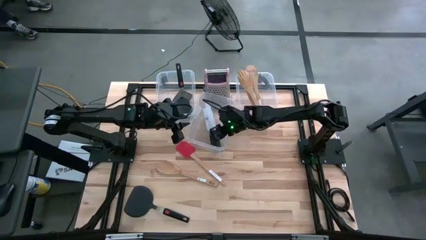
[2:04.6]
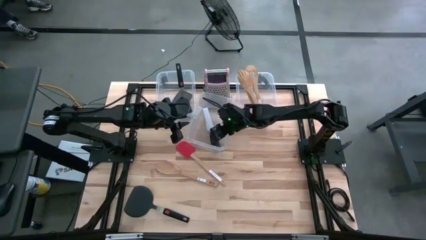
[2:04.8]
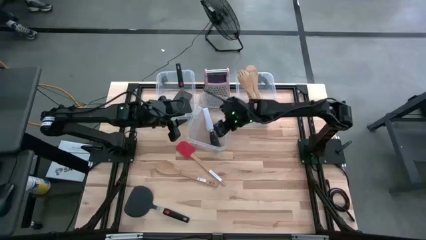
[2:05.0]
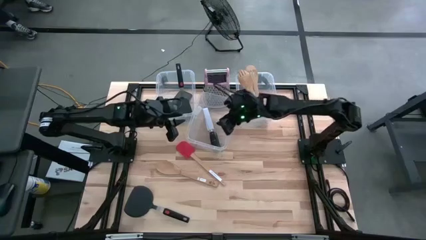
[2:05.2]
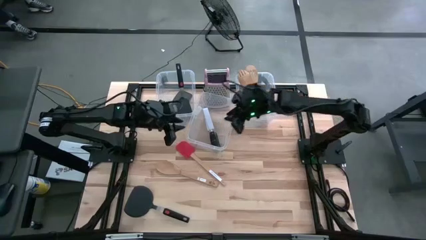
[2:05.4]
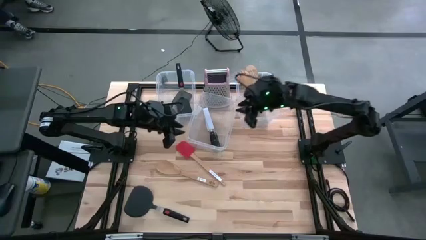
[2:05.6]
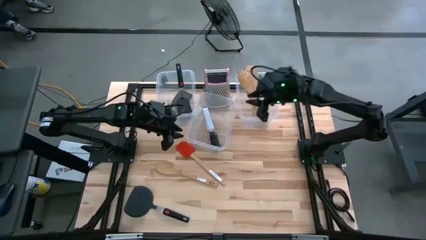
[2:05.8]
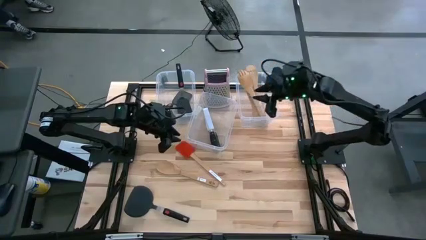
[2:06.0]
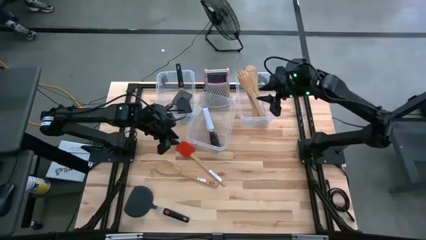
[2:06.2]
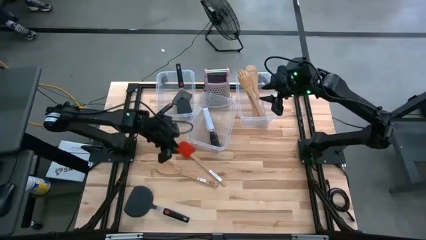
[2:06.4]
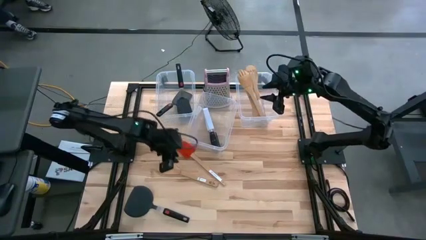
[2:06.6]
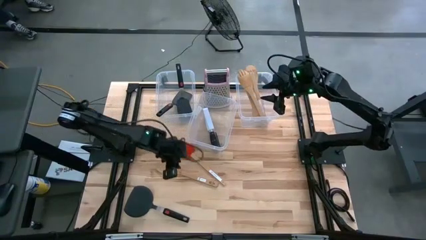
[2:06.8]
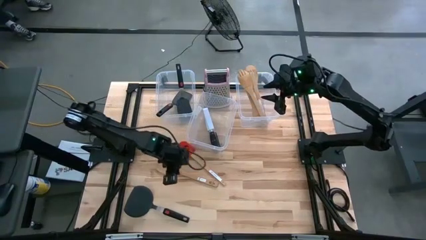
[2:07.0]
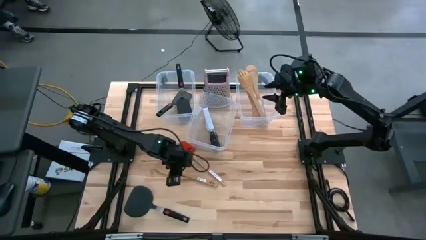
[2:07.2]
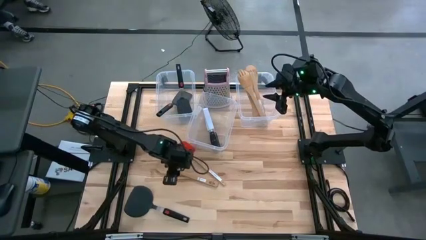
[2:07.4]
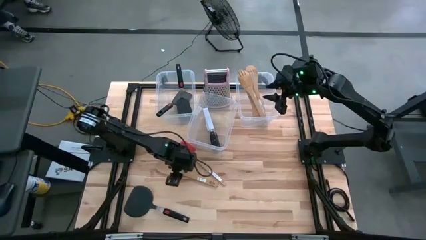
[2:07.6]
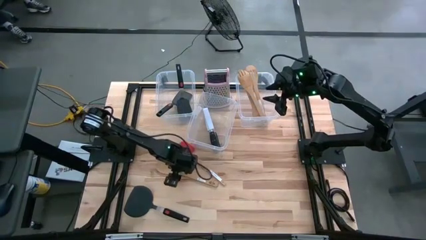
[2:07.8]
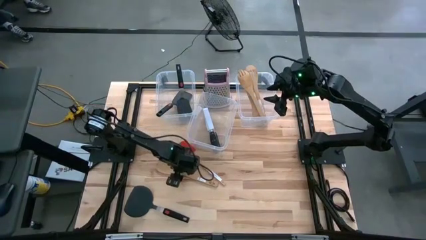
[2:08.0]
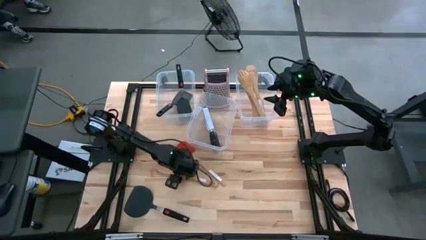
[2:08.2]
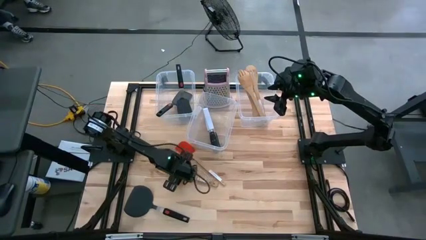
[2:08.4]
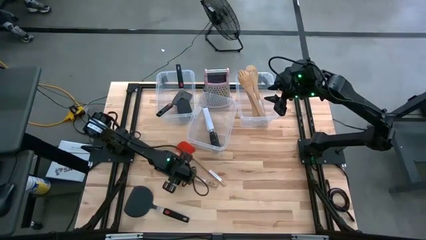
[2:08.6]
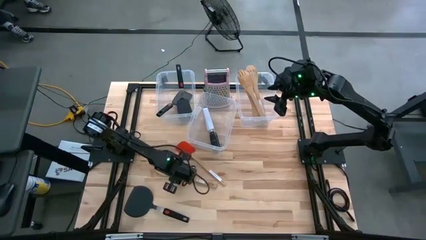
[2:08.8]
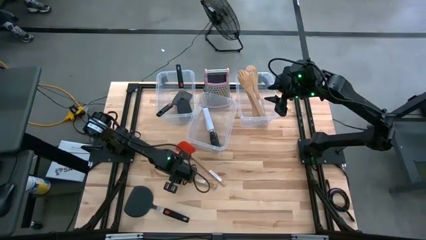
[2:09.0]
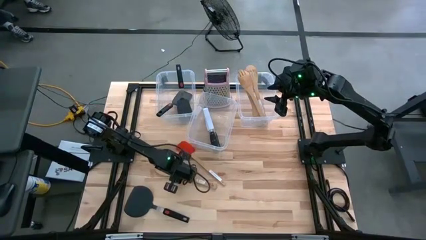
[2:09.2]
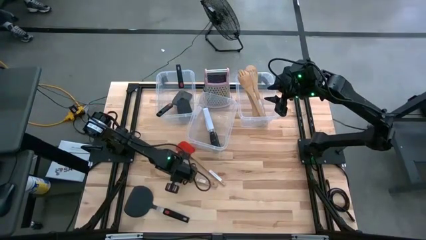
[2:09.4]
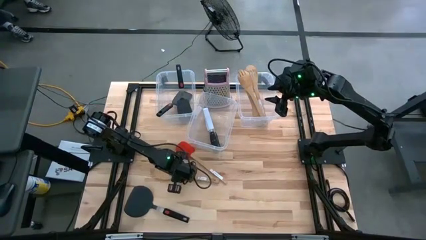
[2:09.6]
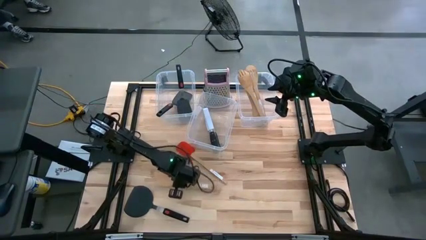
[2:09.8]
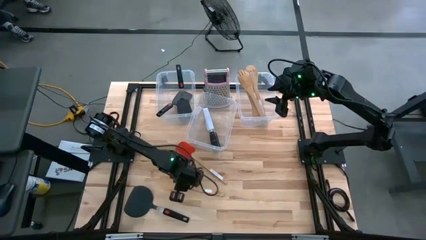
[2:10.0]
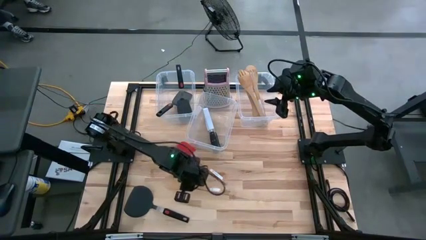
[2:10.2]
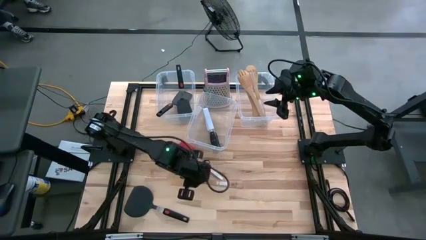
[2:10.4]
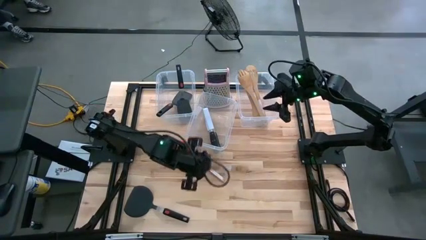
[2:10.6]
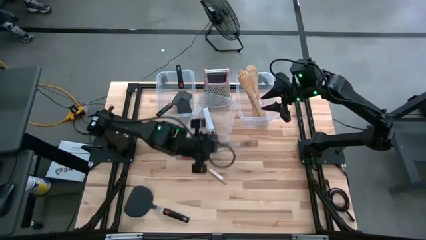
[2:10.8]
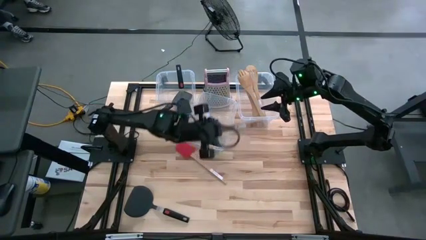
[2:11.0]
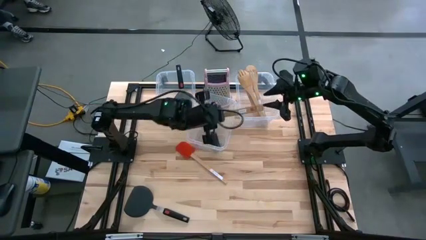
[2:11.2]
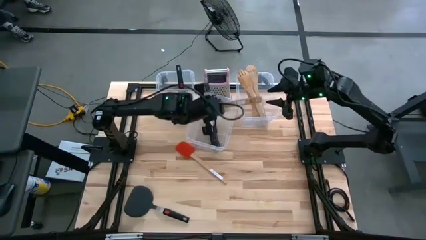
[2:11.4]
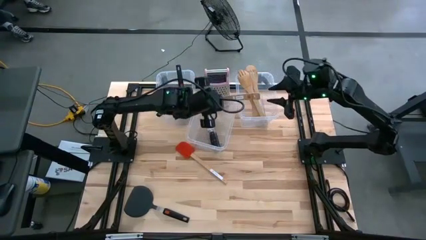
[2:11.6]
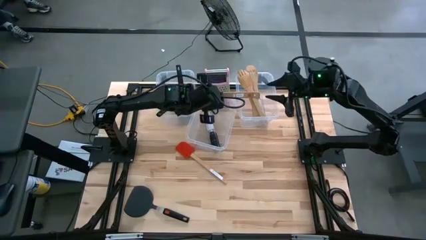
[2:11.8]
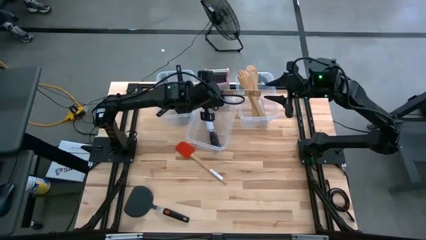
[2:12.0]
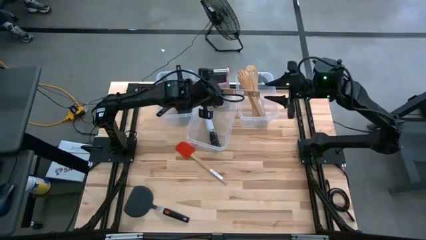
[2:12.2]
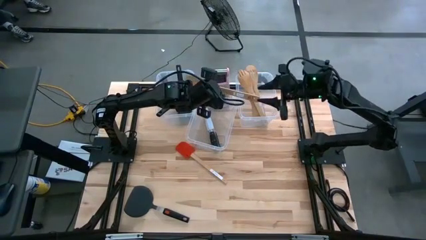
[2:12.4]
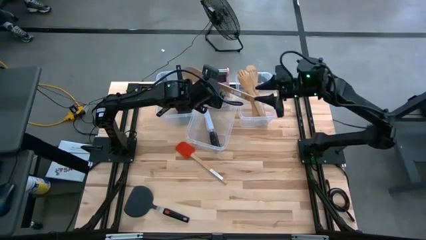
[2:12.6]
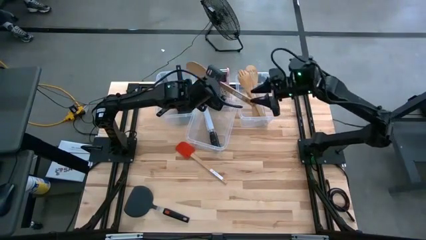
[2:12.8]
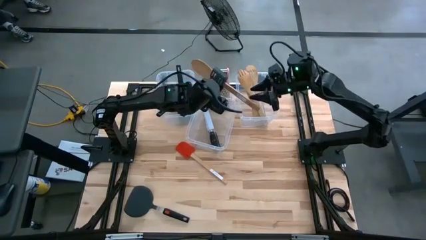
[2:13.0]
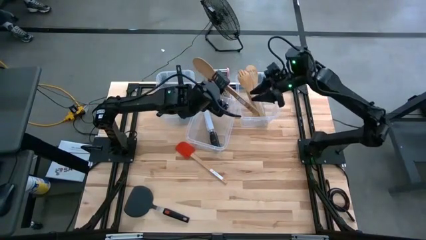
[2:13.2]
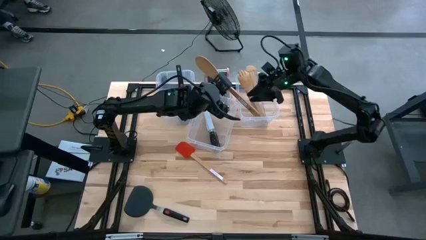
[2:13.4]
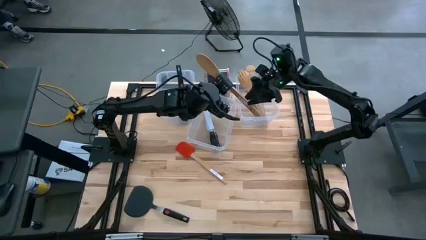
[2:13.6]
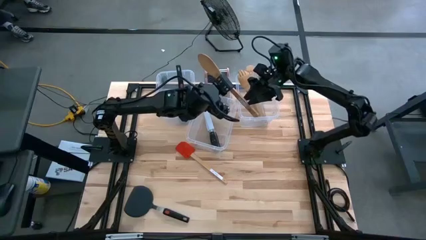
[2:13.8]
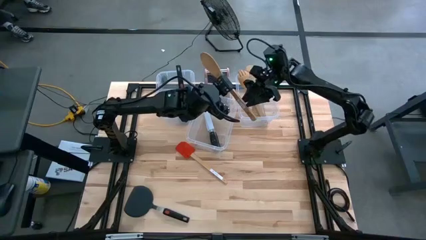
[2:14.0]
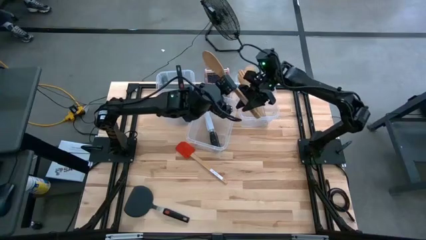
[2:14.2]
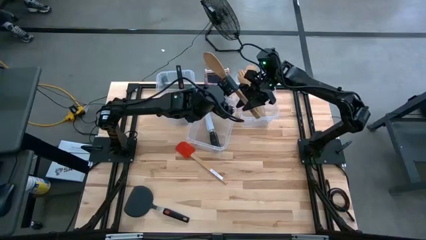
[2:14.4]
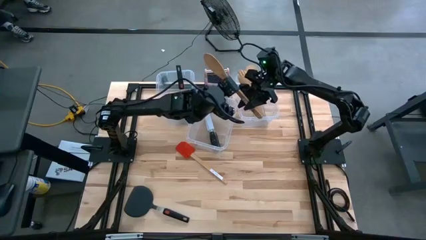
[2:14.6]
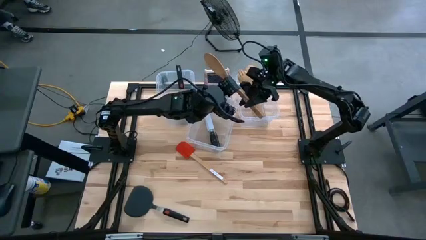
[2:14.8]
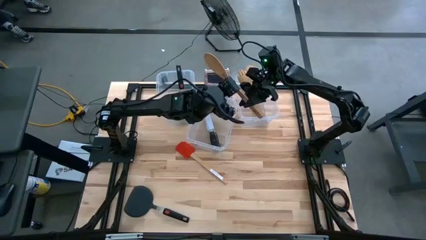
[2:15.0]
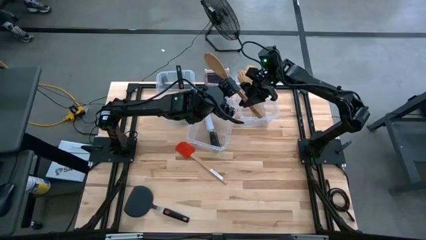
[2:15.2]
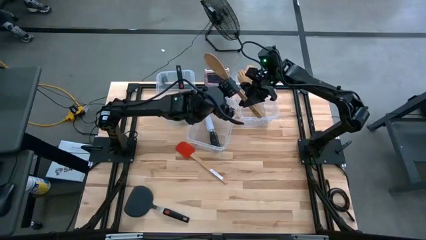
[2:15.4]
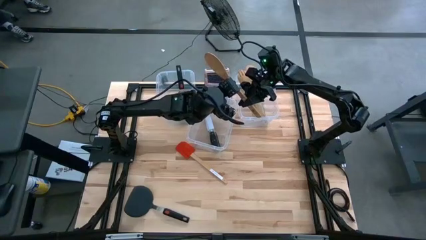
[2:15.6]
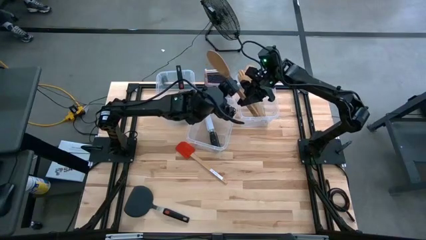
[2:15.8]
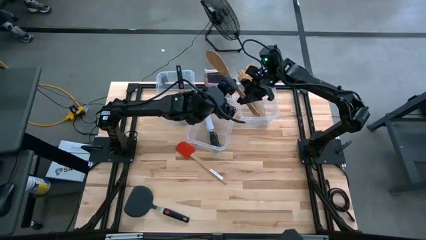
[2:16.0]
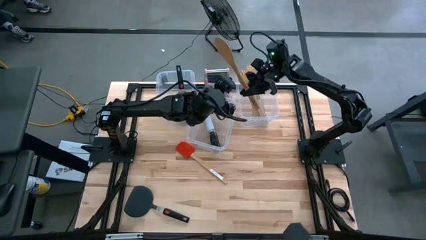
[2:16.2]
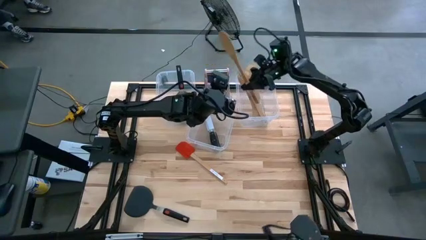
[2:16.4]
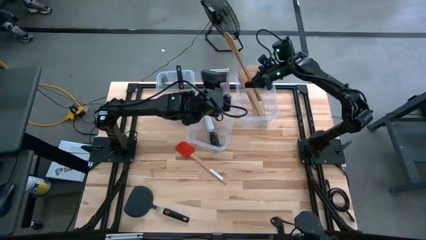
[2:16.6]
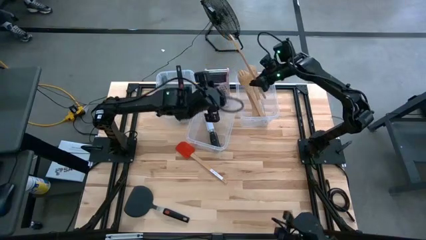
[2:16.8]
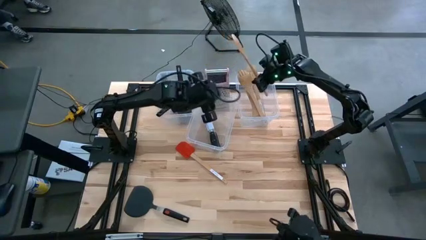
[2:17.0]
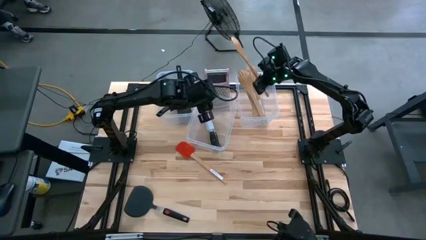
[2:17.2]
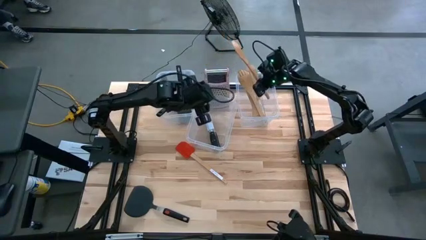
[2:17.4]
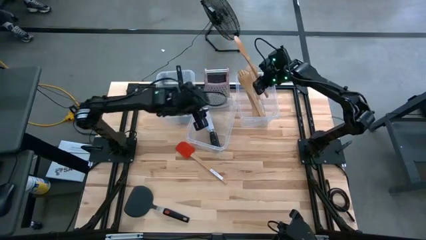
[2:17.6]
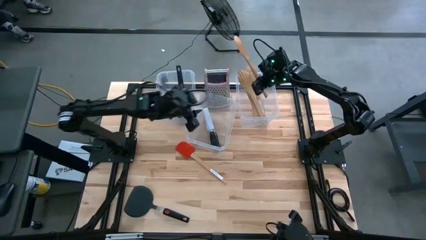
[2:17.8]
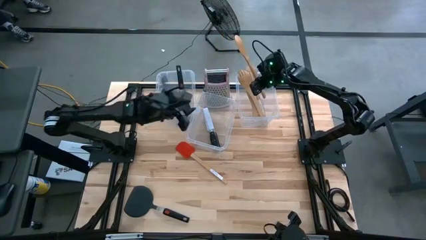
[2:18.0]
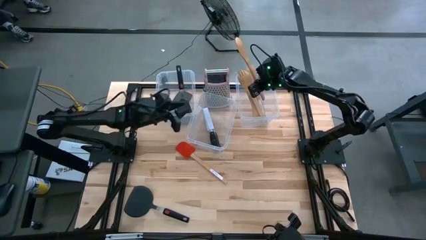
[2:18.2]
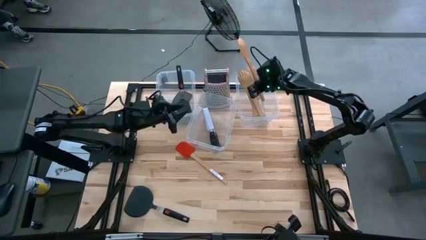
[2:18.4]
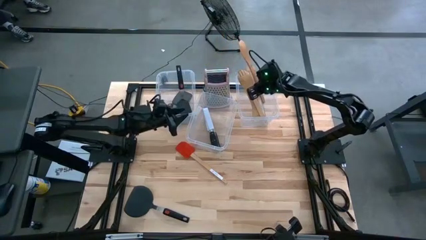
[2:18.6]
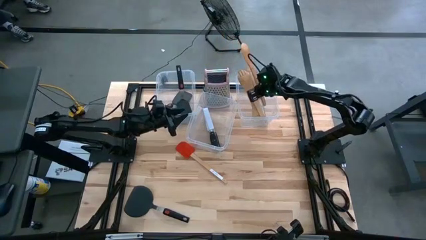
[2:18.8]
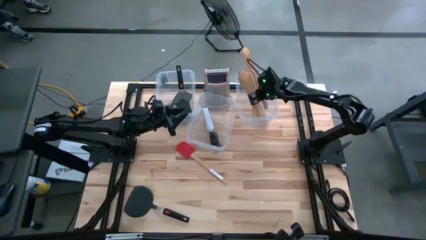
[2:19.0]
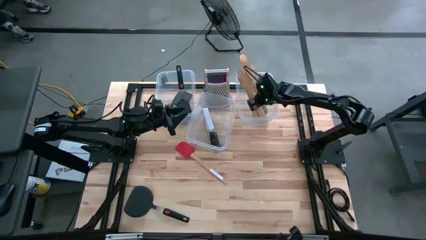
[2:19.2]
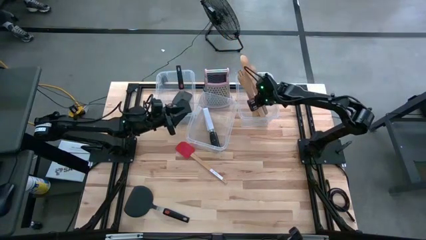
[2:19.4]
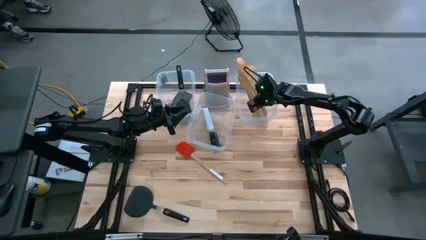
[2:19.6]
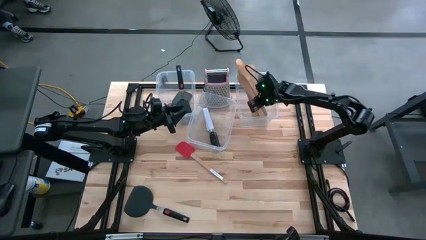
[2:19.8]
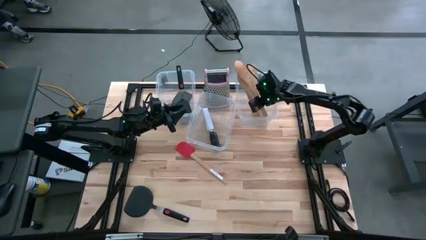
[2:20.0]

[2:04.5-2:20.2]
Task: Pick & Place Kitchen Items
Put the brown serving spoon into the middle transparent bin
